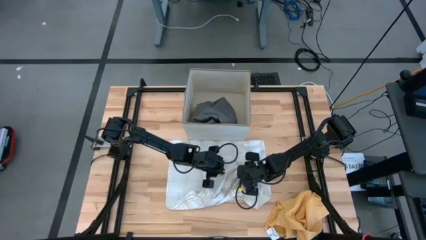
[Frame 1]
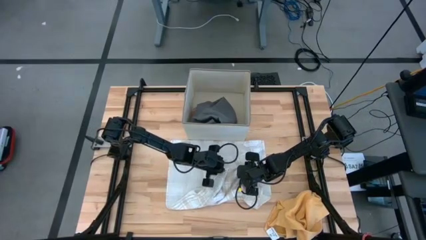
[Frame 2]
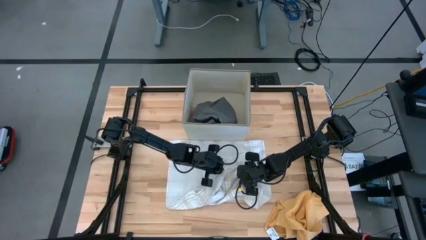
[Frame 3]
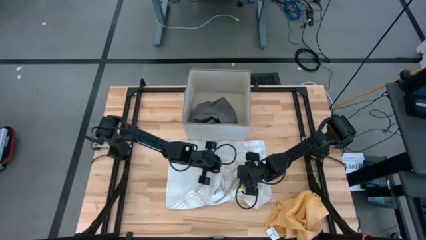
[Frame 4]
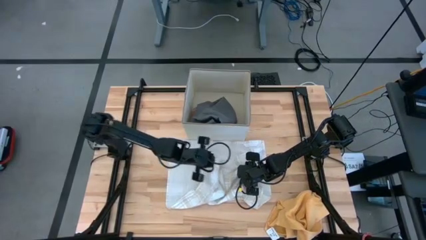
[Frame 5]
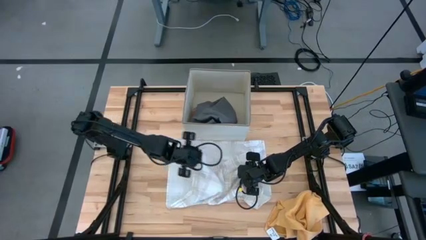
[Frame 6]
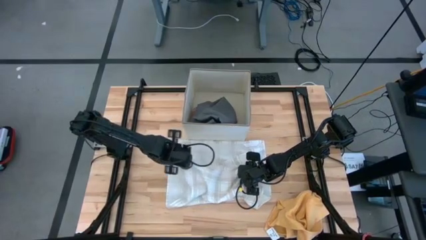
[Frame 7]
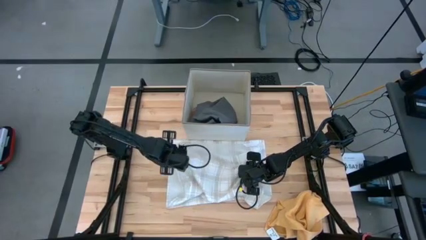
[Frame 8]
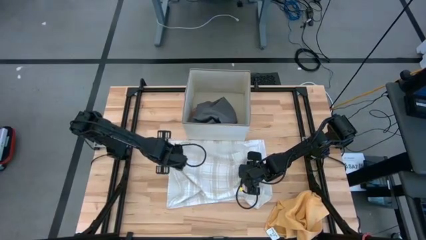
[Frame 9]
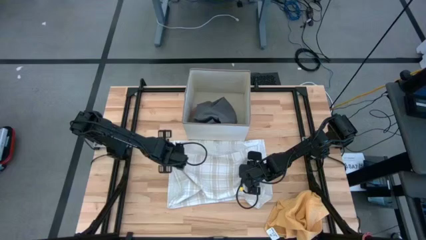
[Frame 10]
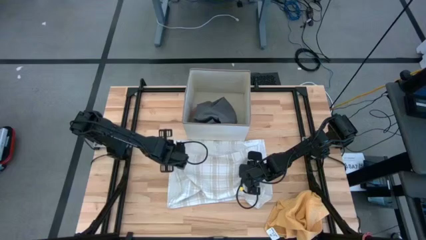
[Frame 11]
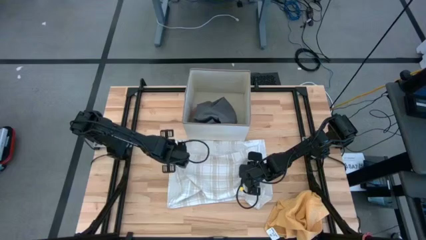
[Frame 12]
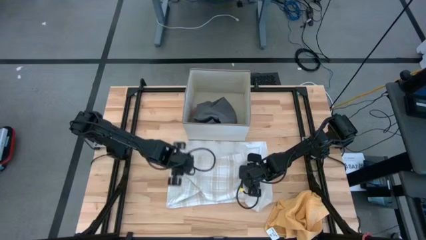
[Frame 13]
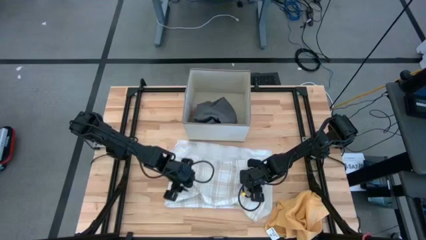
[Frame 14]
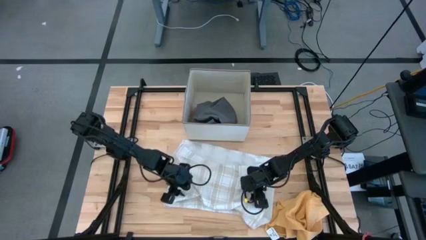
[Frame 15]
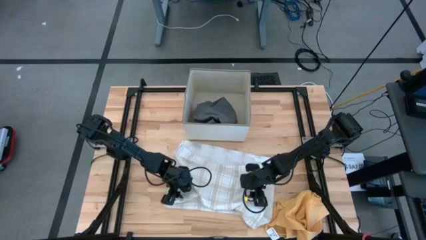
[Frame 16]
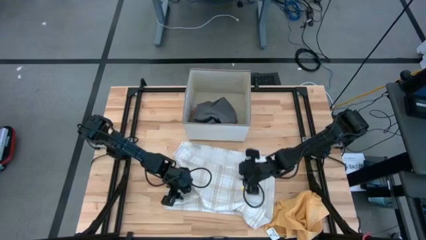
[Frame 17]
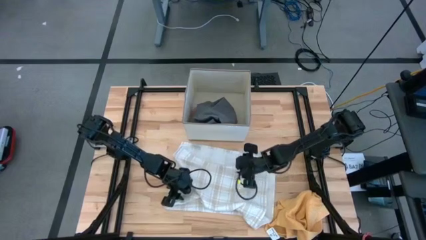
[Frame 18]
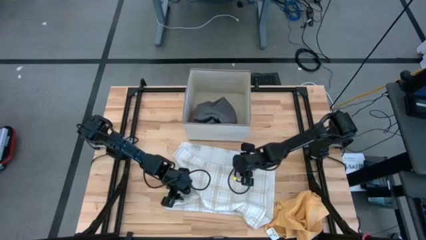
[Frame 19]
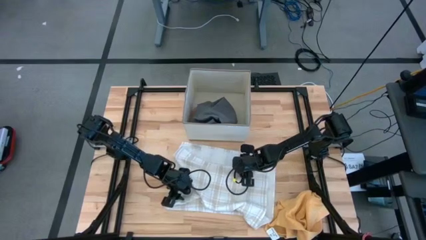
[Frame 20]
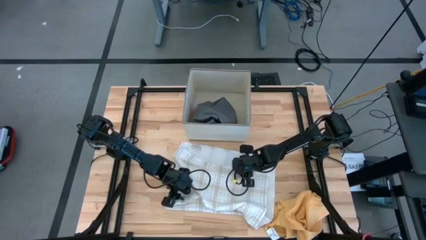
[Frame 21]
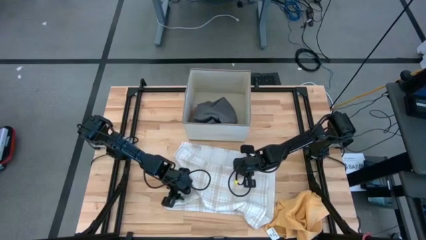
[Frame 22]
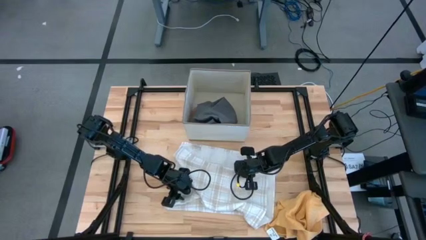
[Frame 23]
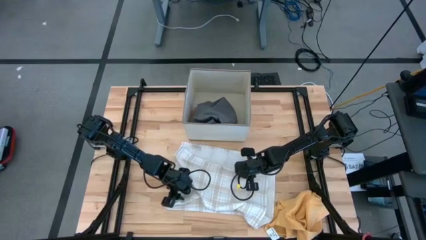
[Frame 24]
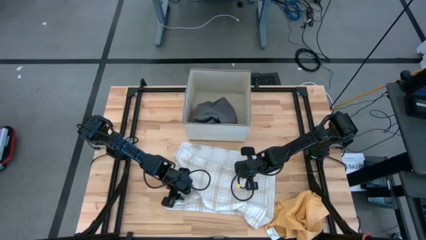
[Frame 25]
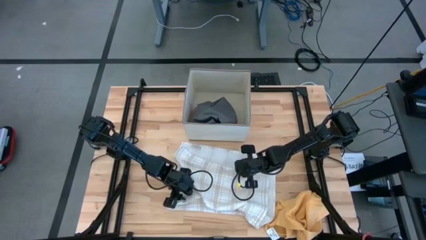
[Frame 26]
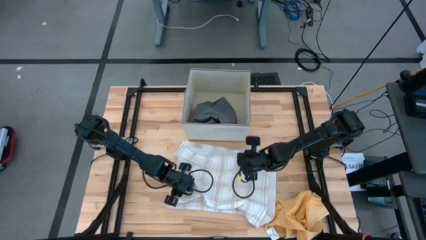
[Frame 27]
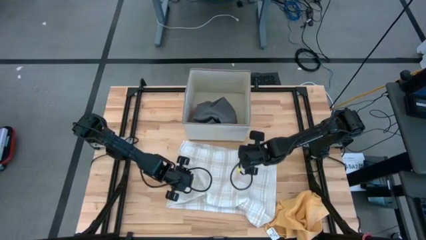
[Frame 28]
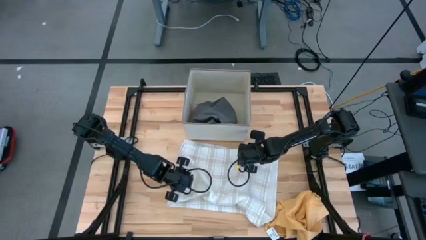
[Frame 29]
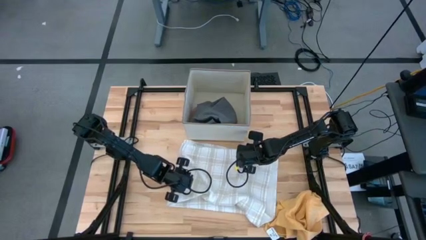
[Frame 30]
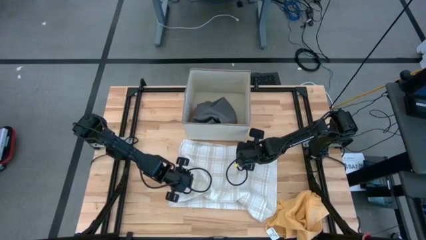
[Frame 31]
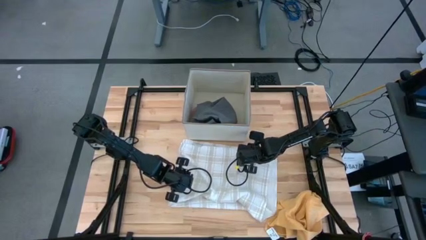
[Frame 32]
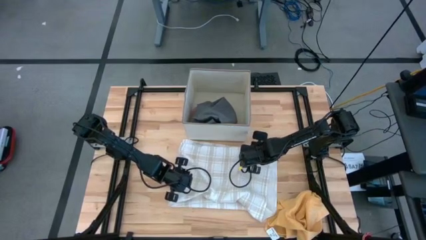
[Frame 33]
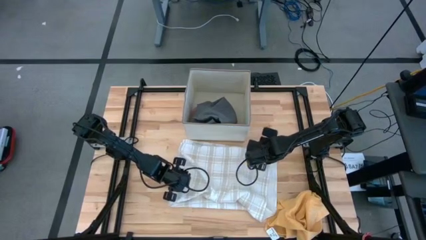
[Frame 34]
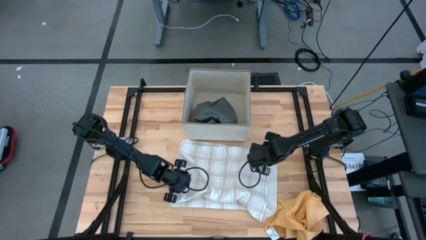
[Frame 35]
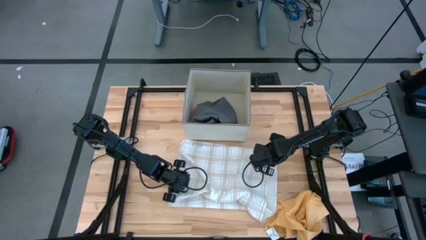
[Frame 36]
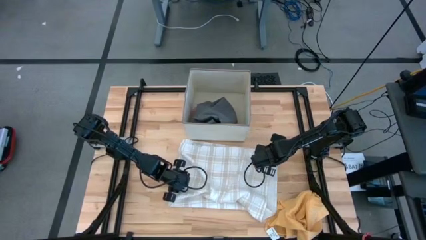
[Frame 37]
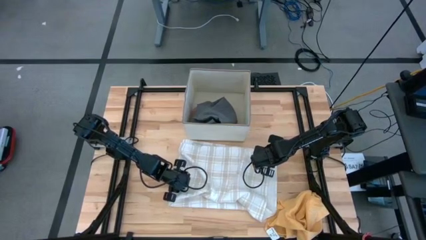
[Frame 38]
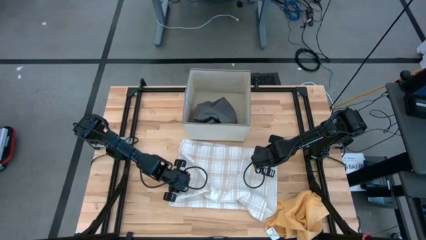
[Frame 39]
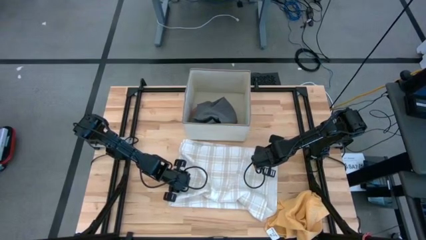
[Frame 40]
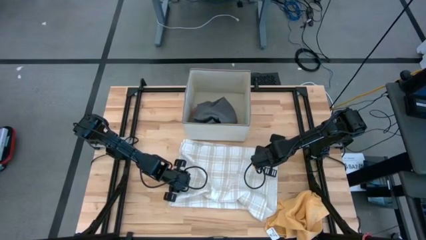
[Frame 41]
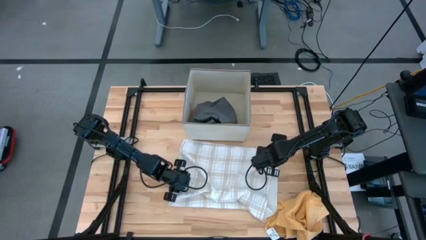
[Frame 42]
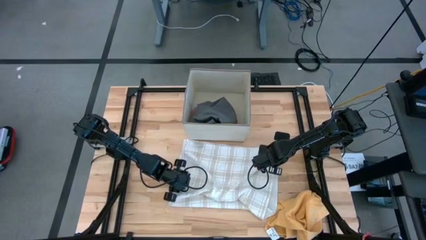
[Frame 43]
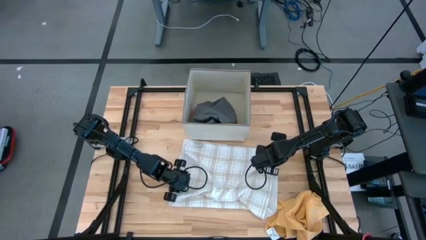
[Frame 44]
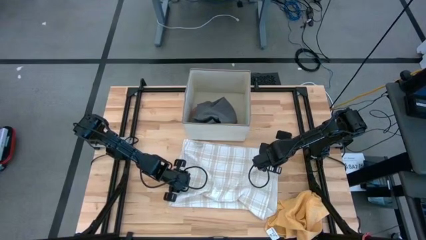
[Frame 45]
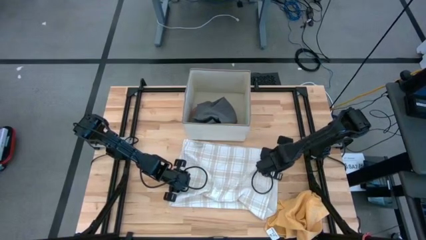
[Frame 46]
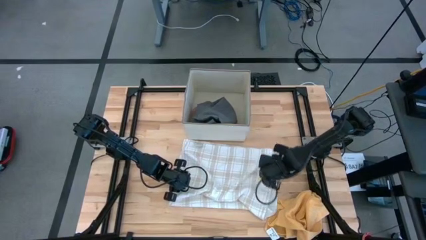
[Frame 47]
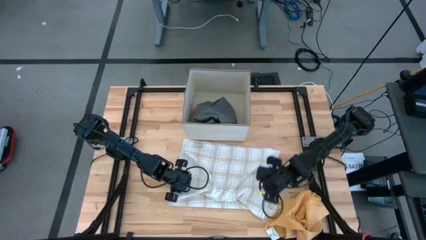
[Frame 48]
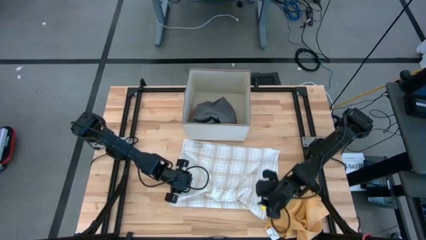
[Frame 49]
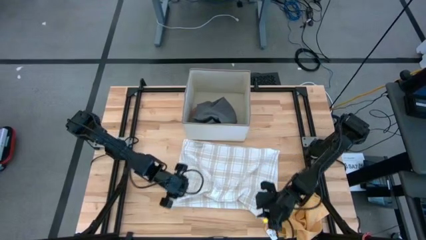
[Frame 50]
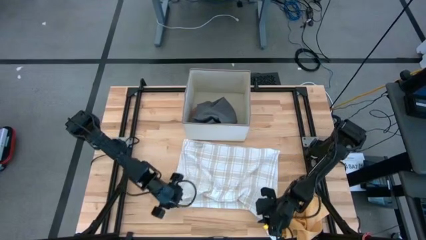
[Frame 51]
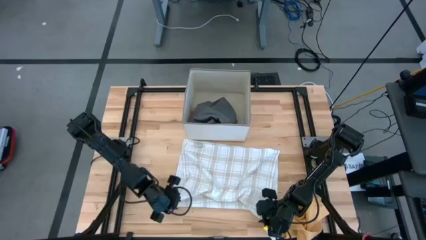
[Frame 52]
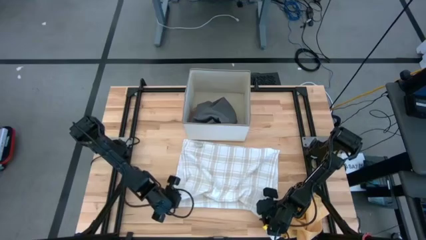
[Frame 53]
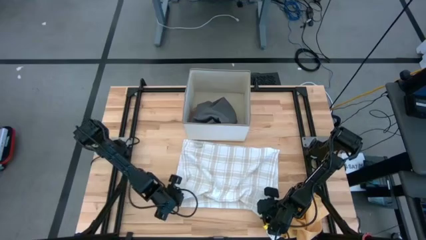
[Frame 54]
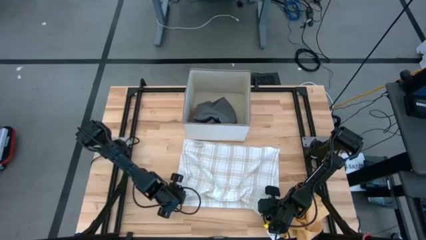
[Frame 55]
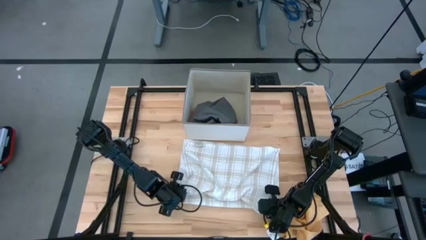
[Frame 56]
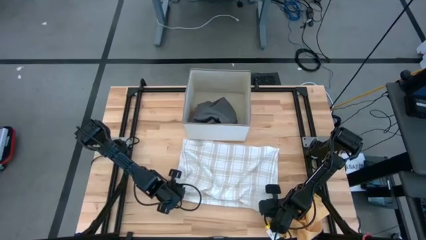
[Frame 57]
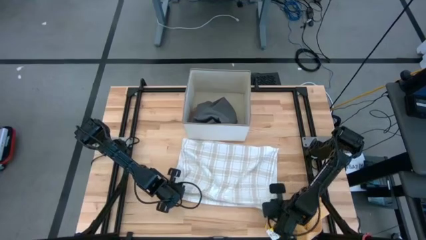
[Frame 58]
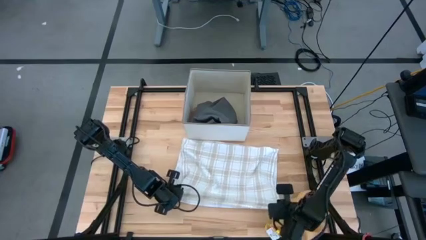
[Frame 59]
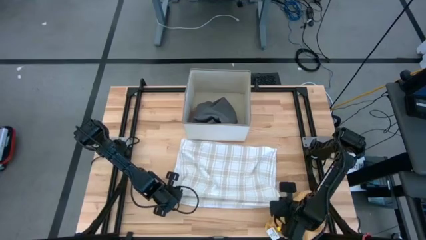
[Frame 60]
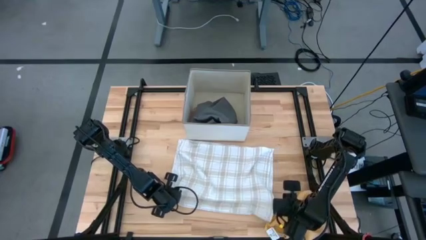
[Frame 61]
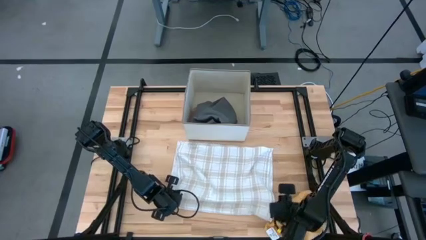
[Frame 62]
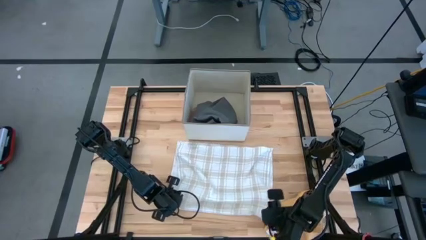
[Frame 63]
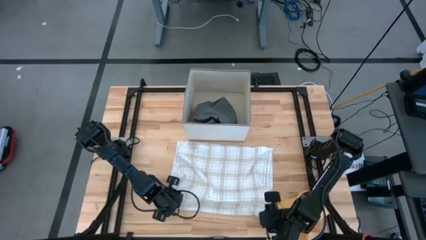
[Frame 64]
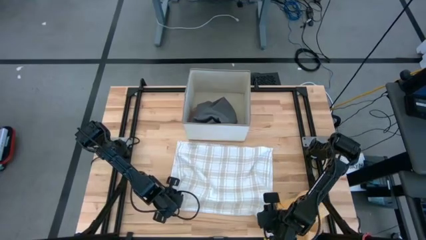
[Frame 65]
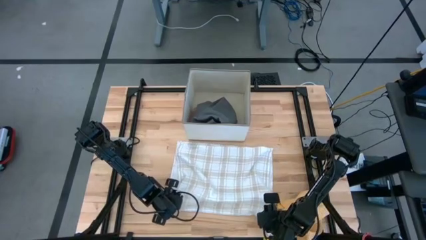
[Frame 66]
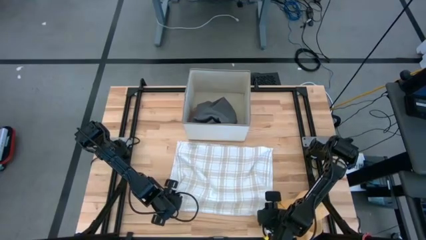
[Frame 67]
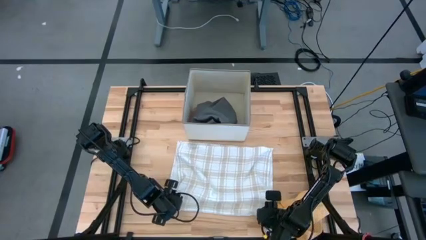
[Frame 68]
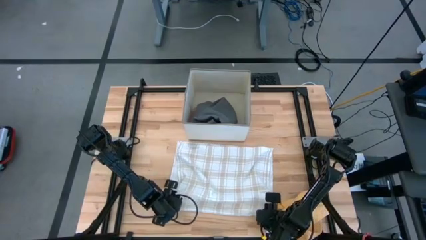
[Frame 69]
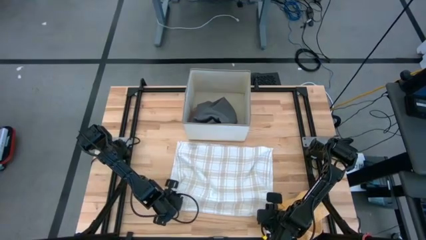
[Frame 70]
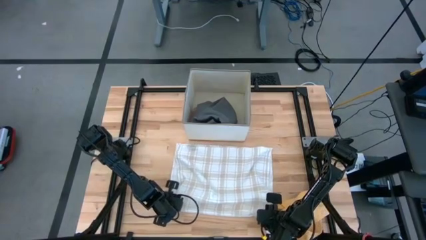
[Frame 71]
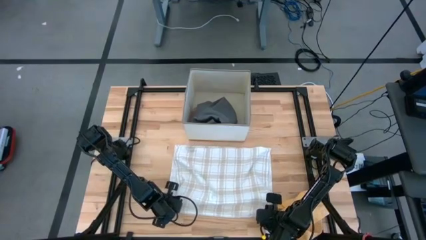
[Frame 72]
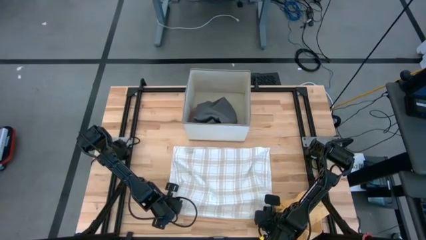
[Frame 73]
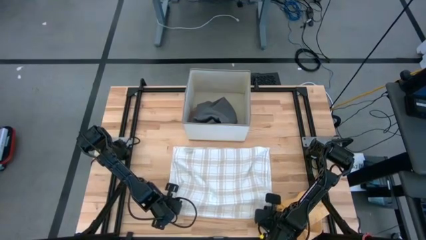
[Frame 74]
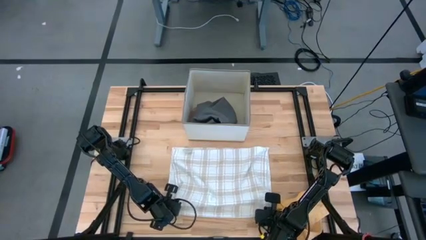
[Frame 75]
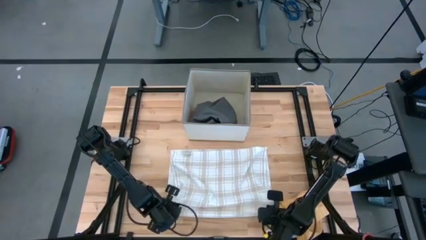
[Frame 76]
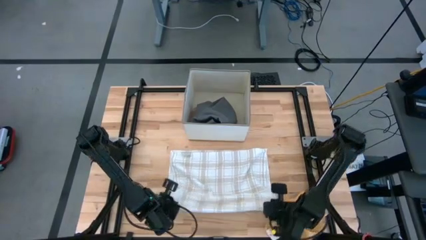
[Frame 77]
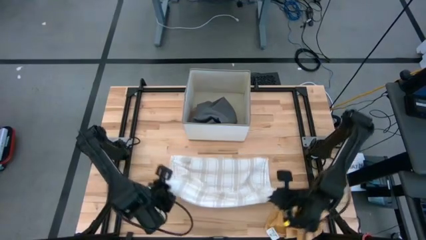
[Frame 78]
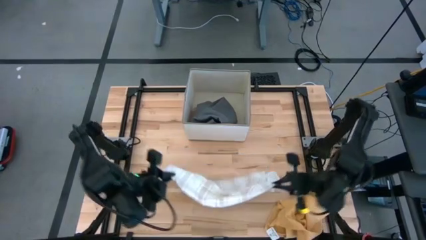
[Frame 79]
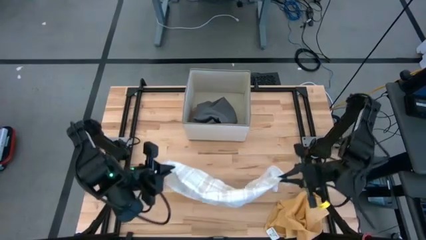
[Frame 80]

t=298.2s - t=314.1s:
Task: Fold towel
Fold the white patterned towel
